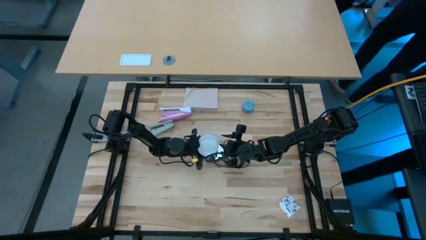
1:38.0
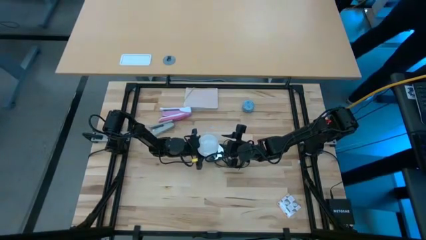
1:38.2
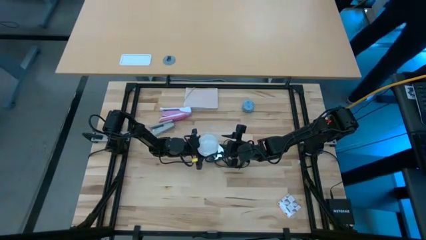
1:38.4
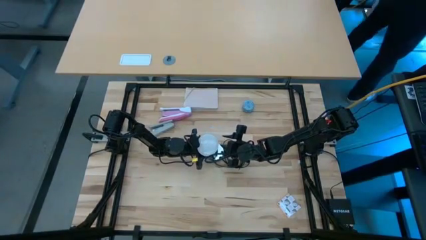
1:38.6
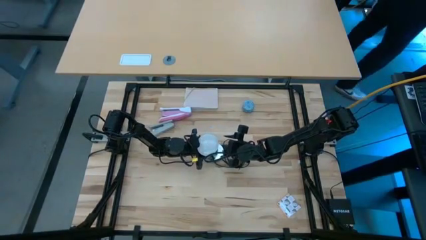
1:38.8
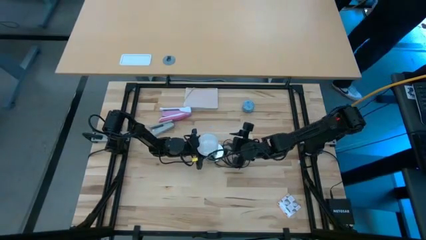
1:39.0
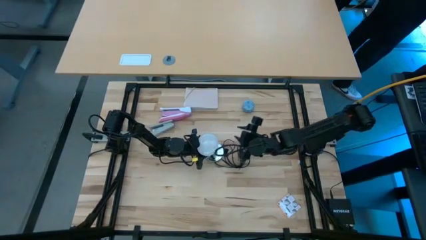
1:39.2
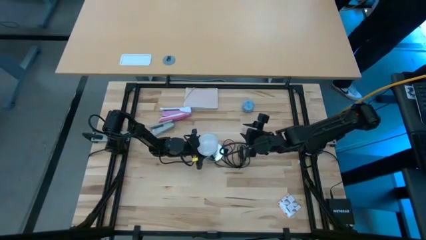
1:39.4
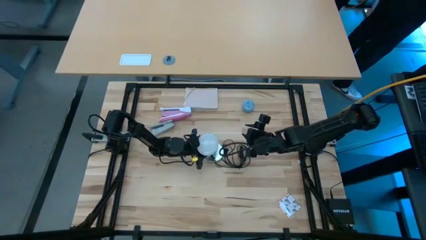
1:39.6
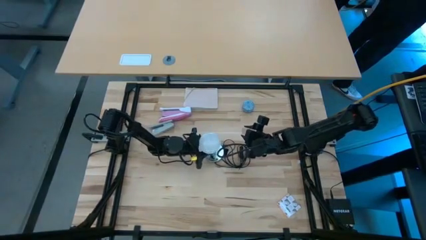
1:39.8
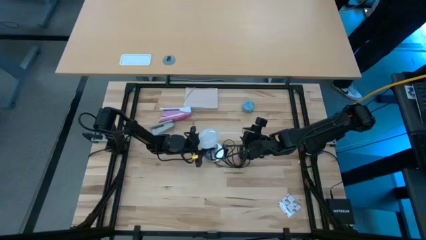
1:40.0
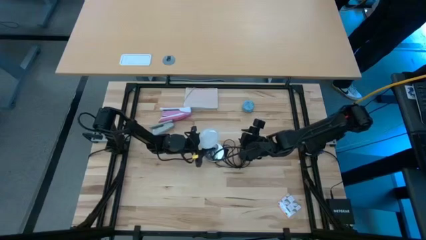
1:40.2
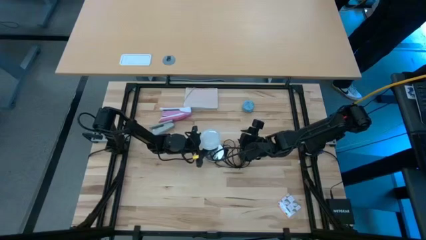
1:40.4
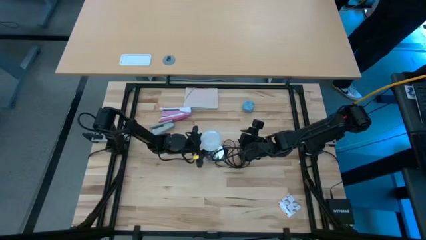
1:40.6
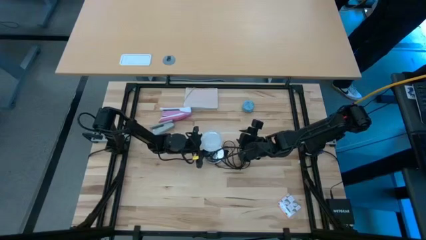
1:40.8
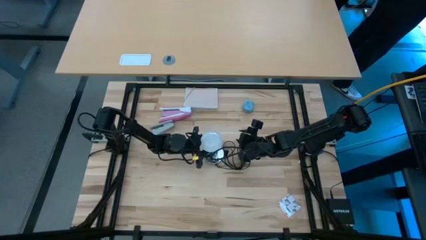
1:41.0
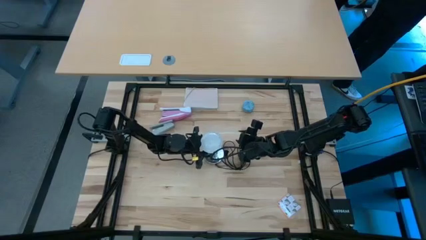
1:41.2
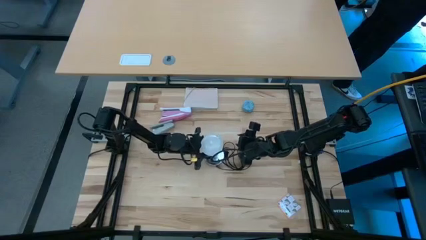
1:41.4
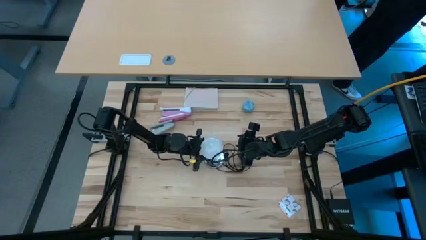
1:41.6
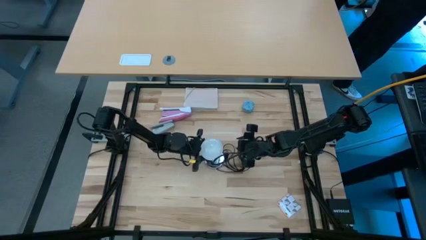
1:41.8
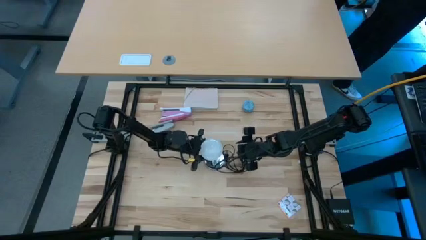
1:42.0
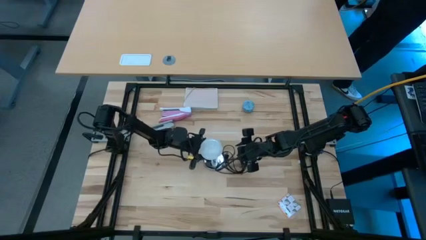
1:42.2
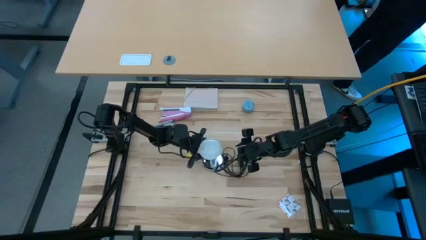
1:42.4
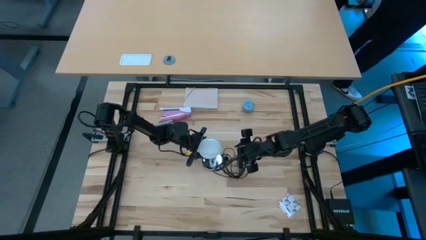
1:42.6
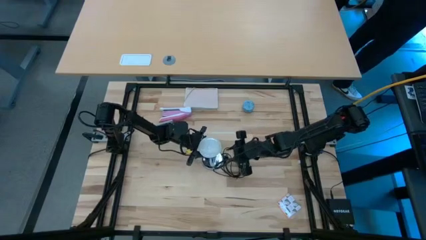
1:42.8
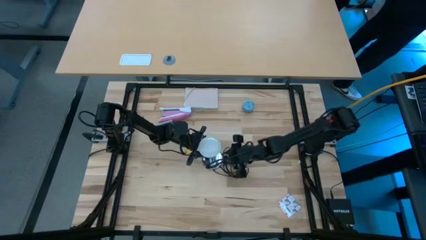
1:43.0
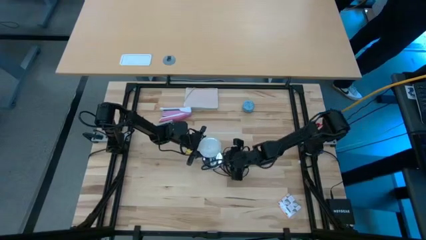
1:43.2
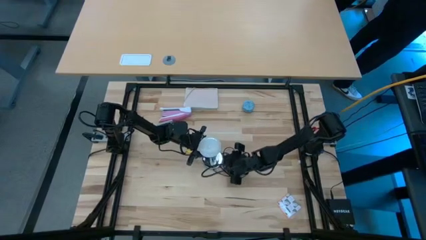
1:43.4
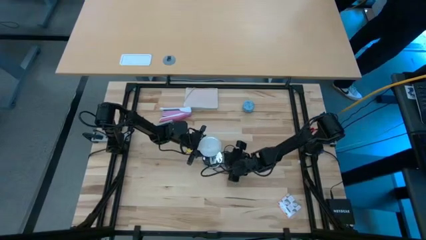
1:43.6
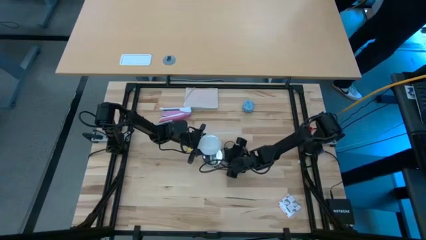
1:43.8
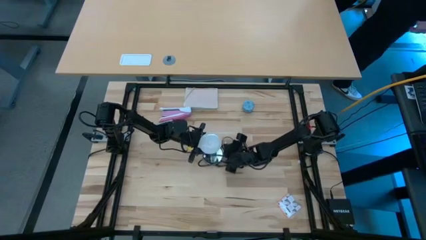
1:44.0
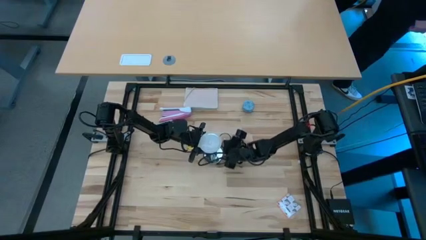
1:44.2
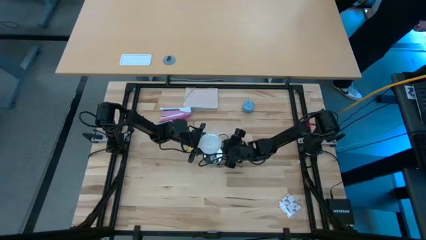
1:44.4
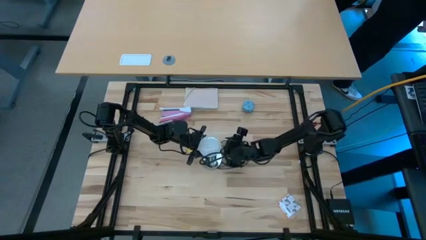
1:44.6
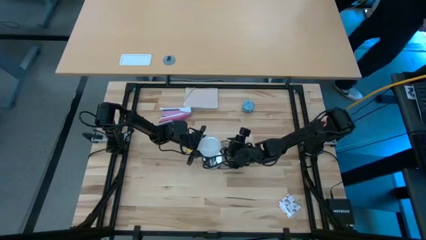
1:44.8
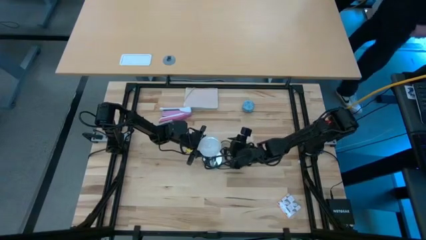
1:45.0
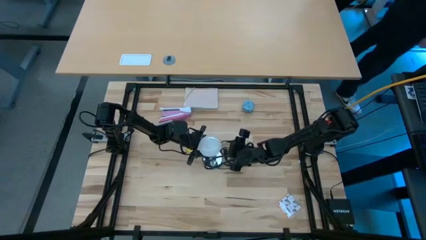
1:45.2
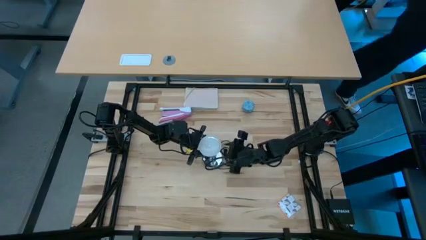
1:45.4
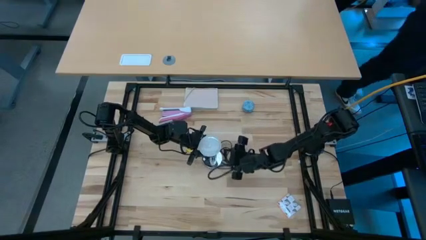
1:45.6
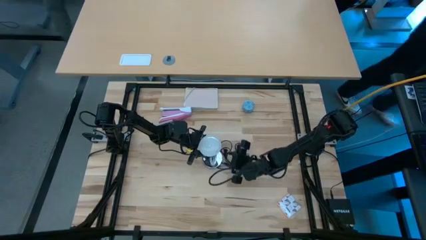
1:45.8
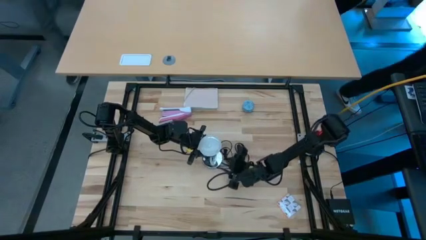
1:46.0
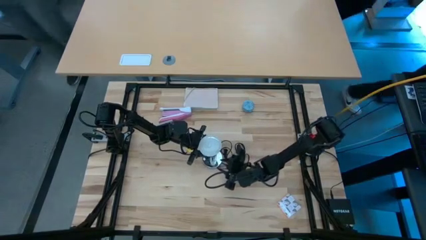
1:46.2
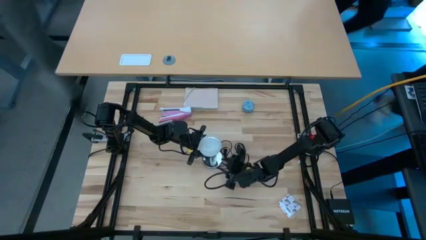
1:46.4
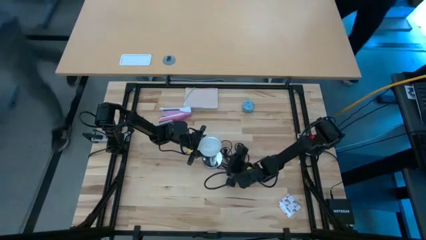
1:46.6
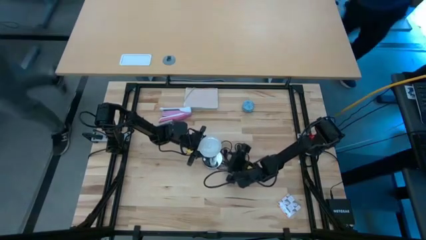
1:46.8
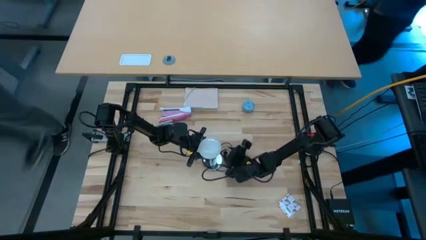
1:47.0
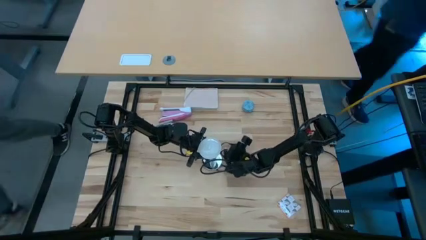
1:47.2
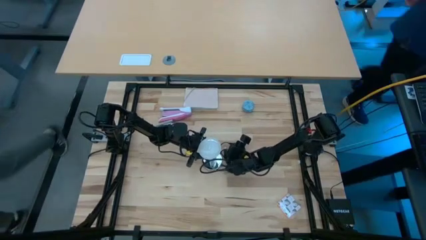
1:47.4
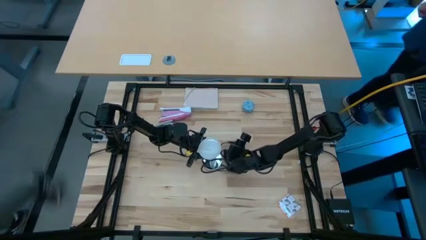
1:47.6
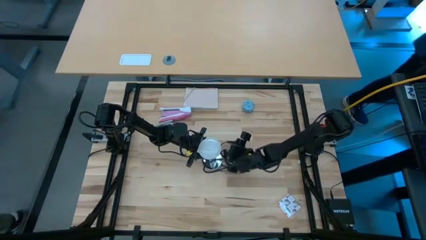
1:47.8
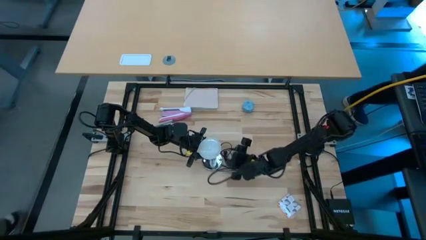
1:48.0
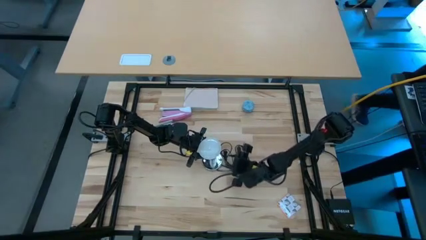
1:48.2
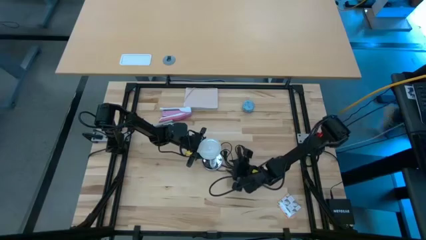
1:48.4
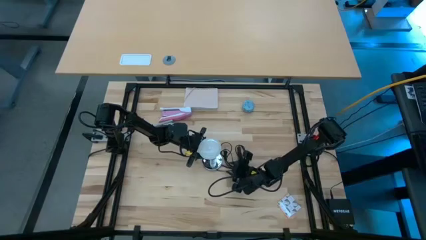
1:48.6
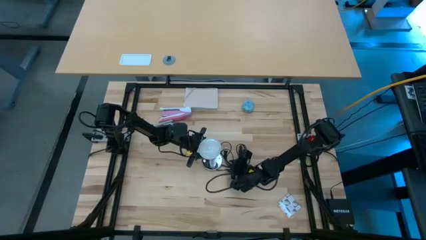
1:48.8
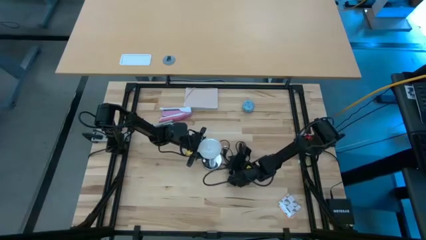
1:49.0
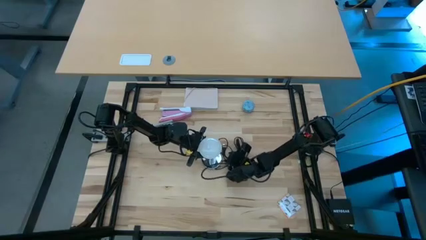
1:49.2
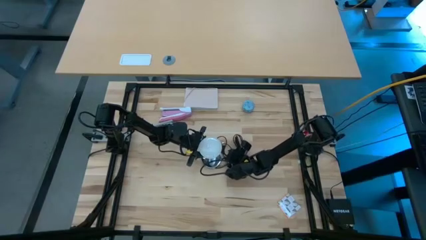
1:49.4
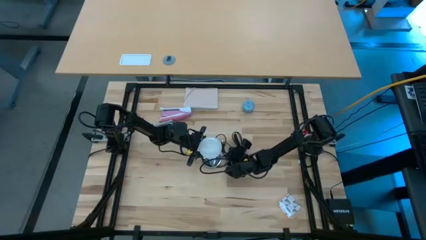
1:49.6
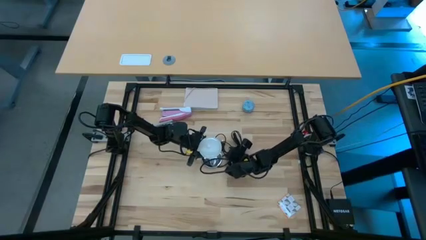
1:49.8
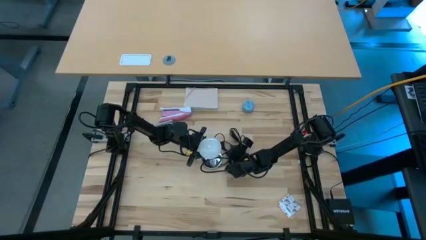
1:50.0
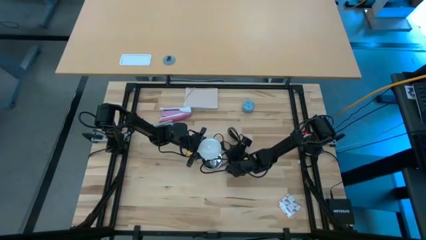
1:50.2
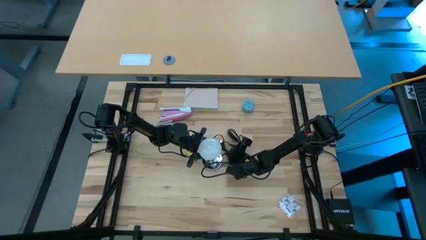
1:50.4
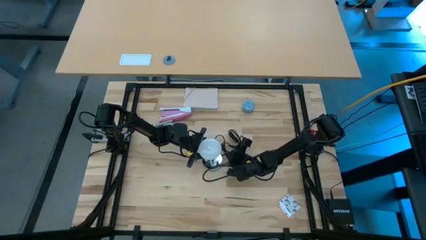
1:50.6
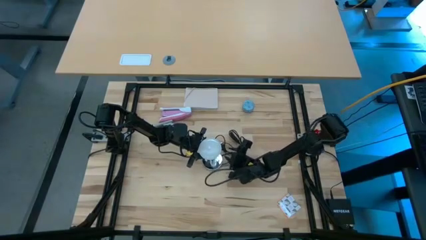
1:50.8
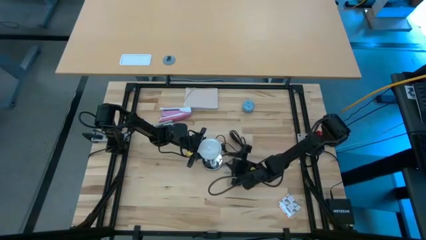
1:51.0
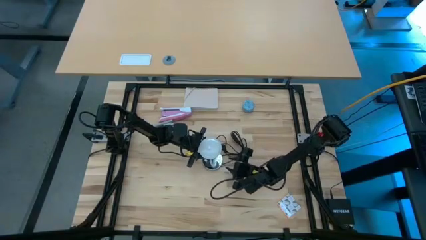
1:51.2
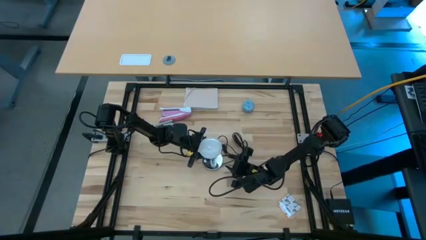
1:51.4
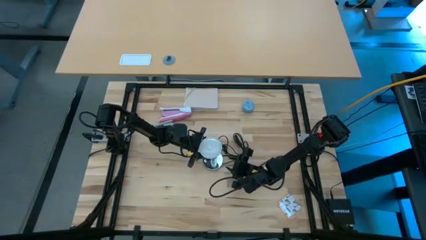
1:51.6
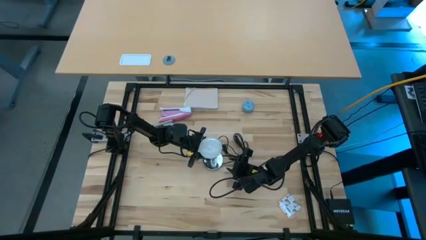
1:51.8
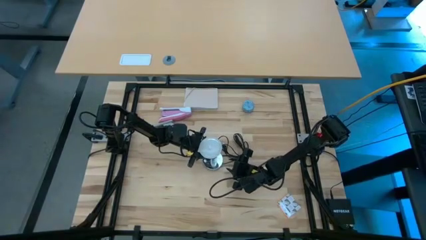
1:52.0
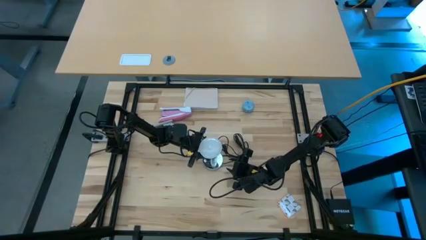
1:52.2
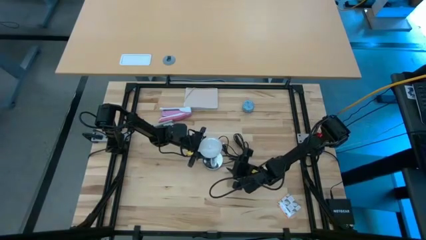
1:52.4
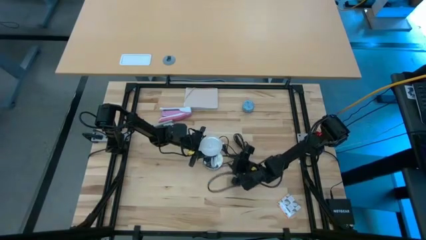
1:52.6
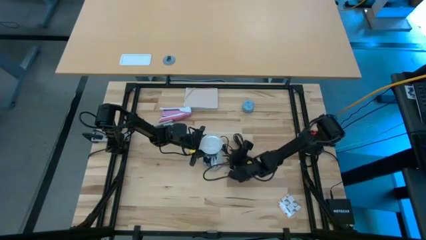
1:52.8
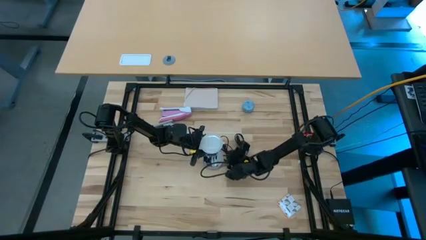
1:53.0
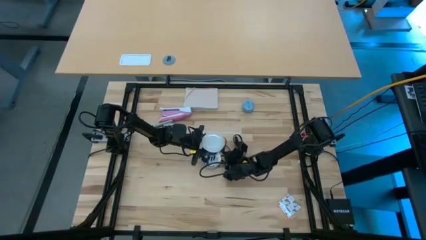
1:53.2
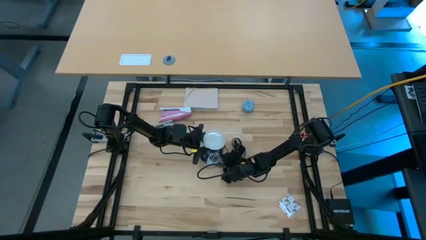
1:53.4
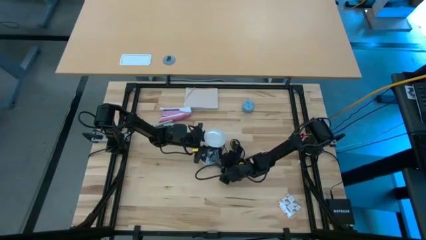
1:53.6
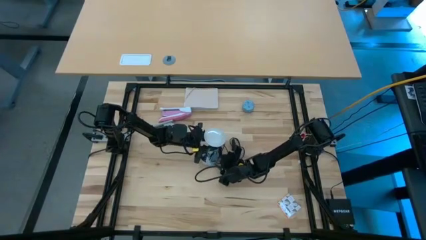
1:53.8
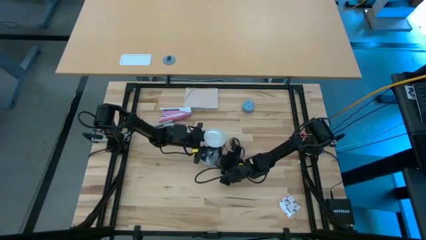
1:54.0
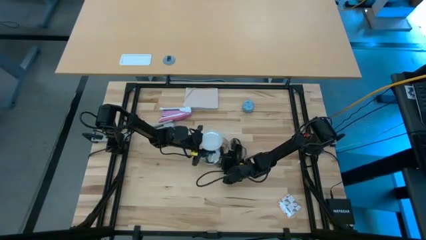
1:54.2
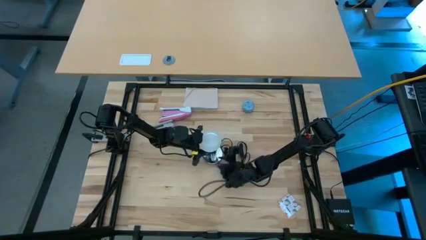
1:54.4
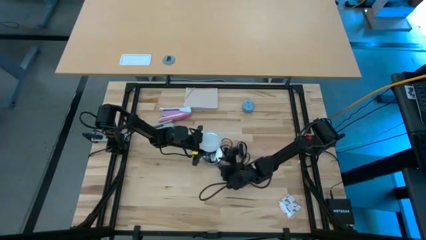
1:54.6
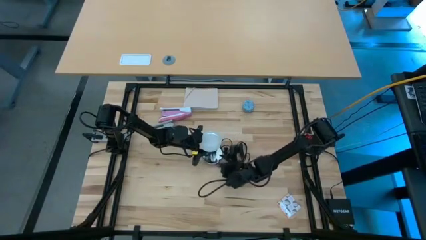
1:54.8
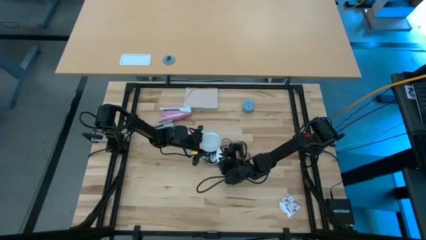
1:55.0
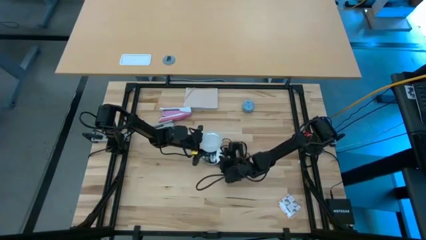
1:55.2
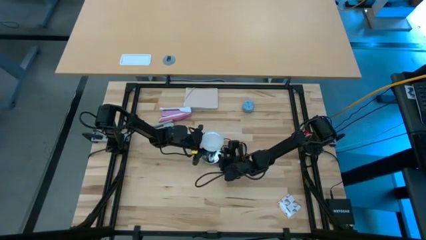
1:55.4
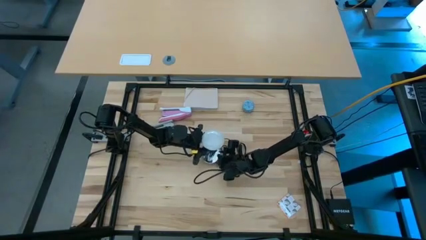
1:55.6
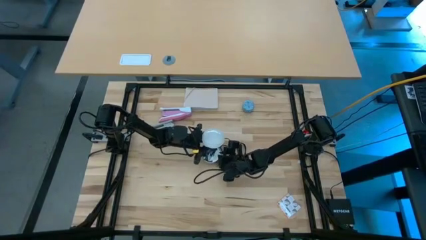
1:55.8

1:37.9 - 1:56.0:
Task: Screw lightbulb
Insert the white lightbulb into the desk lamp
